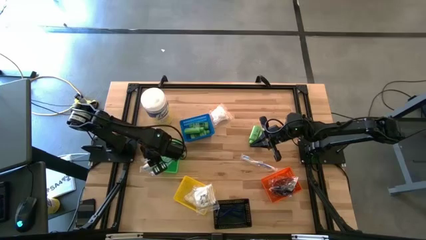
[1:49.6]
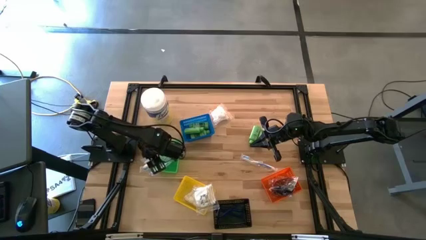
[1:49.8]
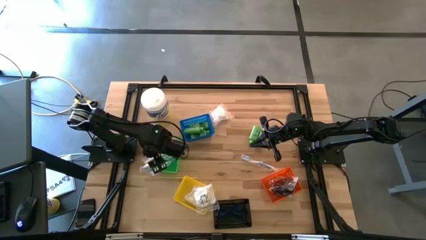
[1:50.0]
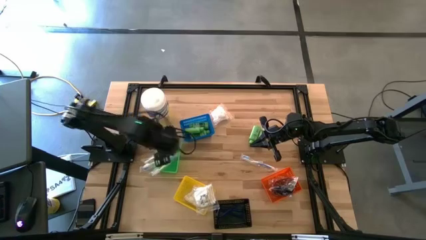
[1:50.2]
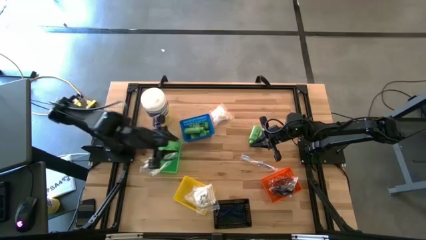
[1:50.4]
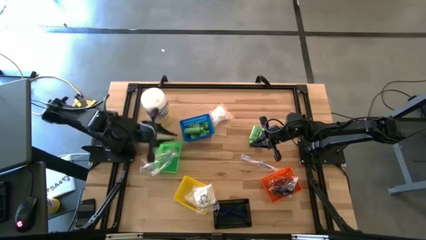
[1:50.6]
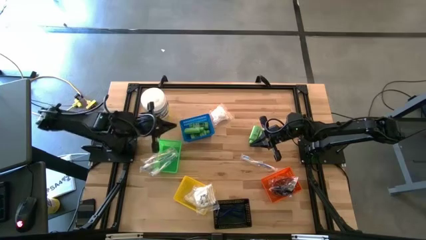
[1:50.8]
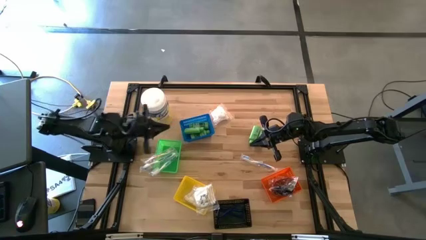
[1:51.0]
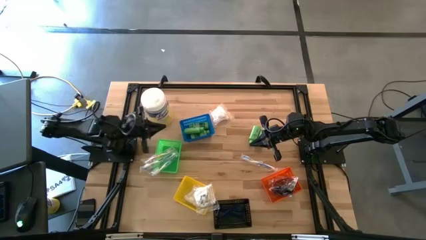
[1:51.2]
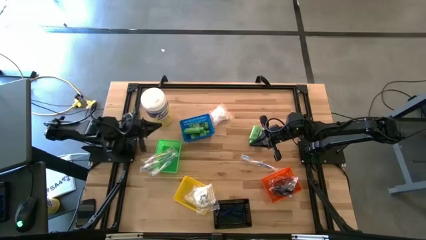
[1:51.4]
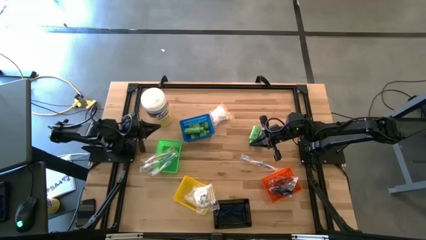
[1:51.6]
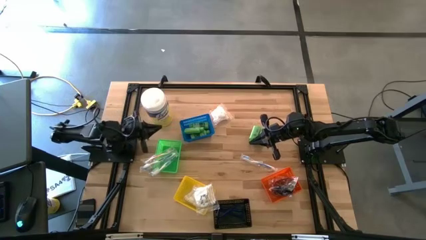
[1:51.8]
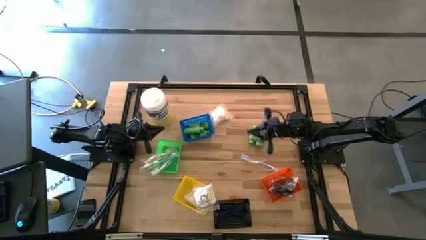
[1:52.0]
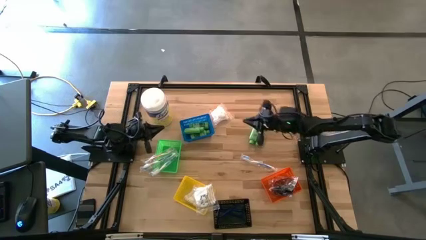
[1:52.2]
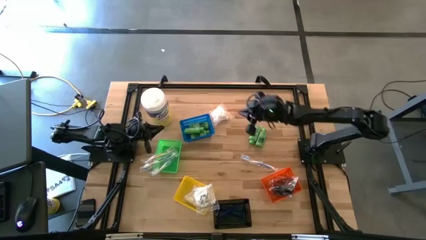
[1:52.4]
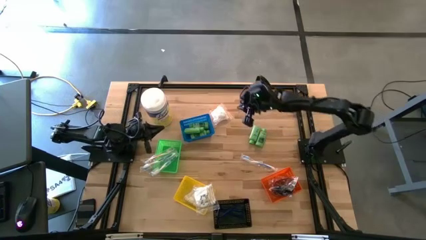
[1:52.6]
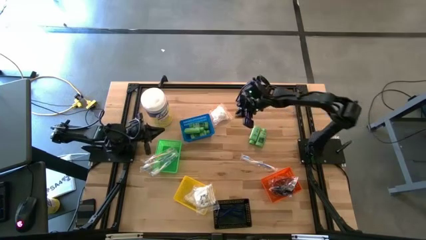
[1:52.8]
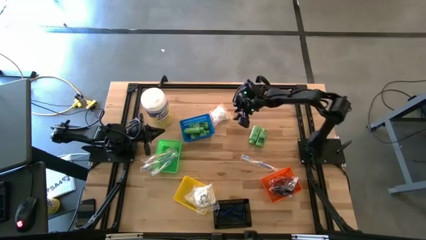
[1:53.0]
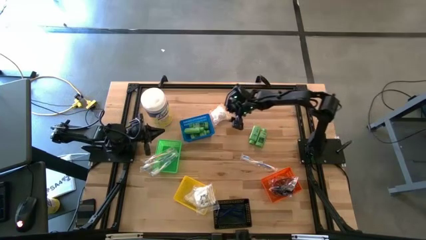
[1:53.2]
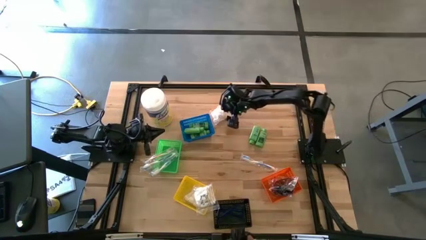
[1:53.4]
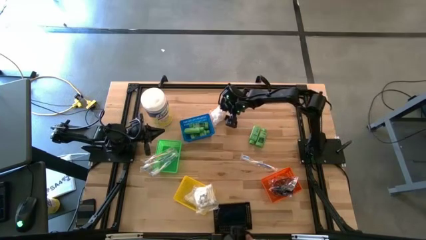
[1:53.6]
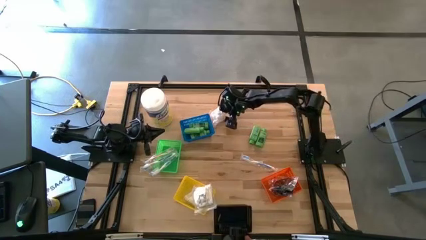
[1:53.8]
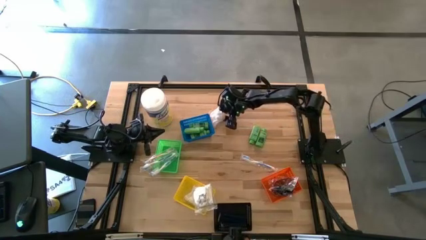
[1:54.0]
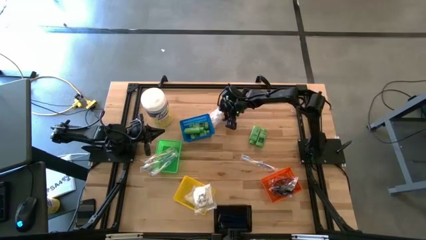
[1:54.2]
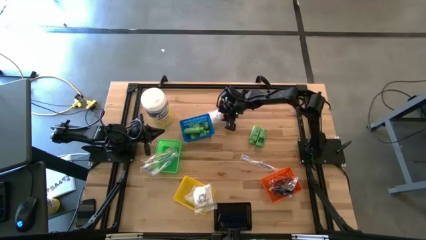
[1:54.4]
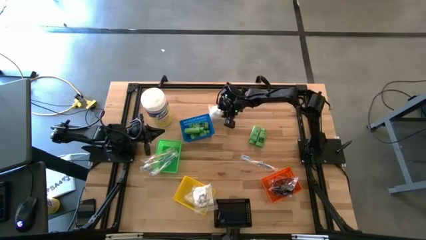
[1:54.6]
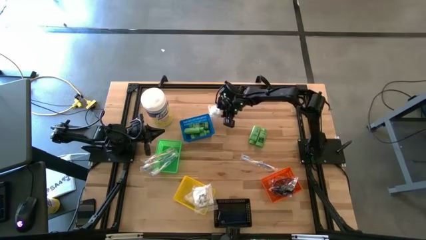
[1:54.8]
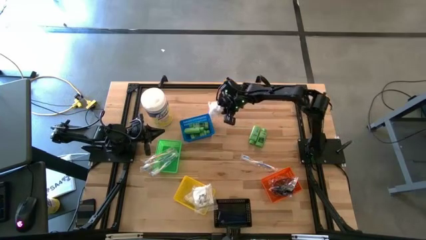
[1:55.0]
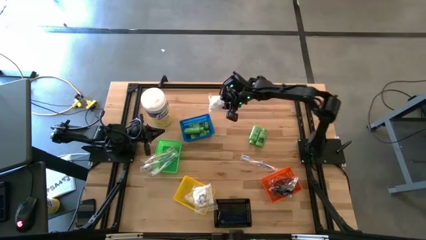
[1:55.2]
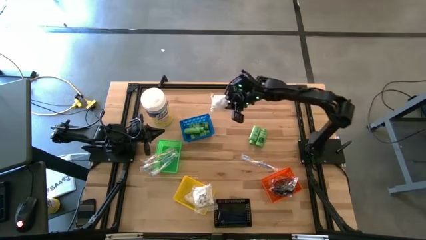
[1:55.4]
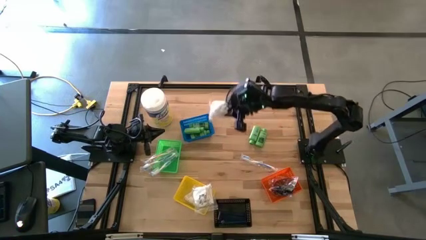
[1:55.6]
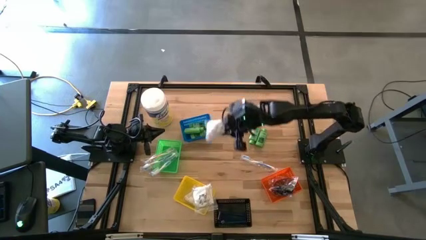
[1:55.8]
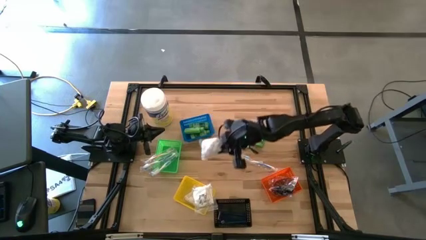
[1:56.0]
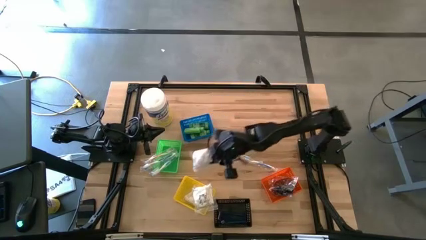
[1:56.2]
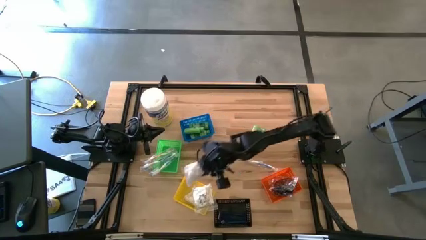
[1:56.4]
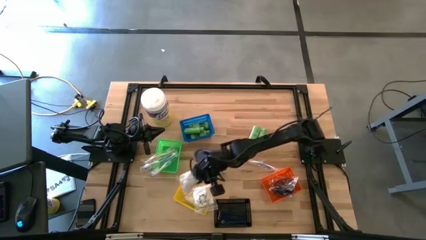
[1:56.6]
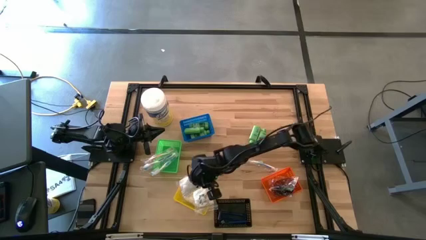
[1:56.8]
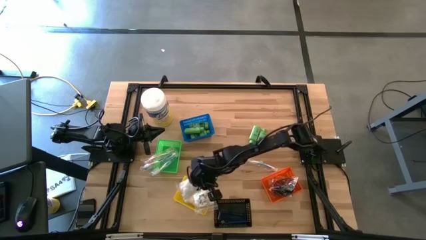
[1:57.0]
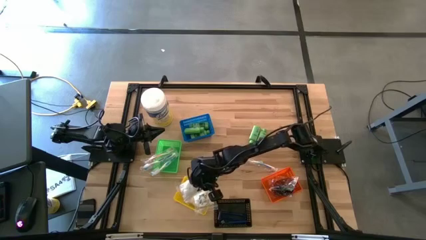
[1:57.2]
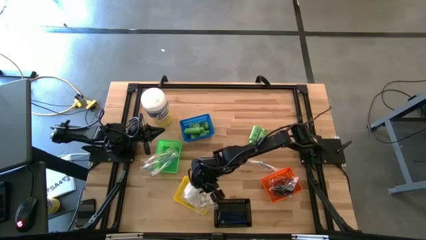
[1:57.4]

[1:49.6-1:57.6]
Task: Pick & Place Travel size toiletries
Put the white cotton pack into the yellow bin

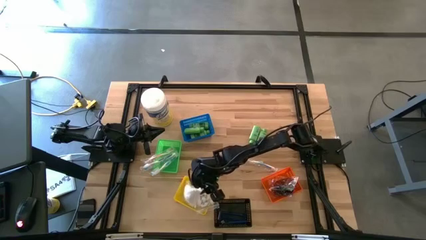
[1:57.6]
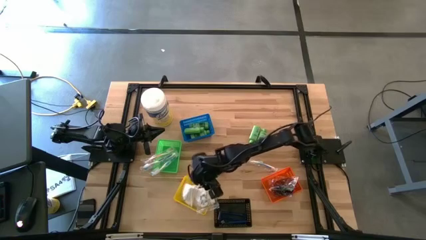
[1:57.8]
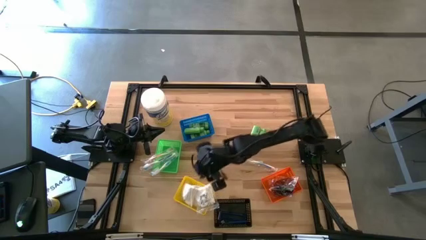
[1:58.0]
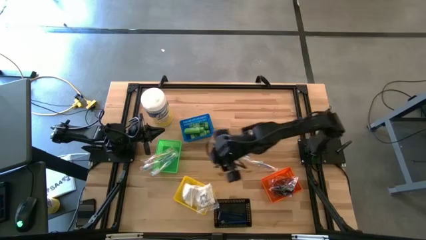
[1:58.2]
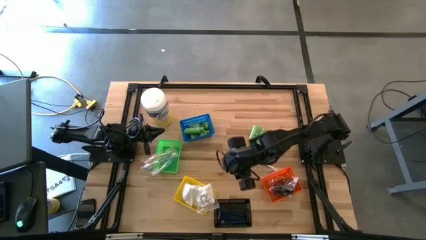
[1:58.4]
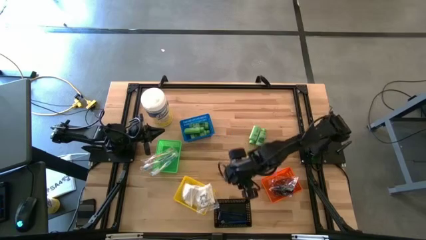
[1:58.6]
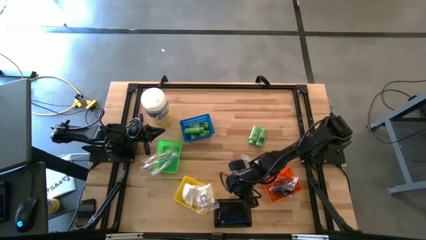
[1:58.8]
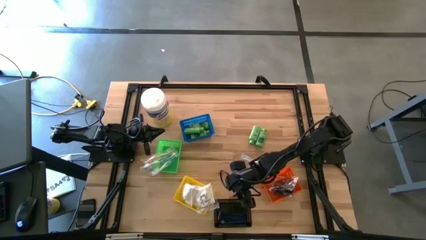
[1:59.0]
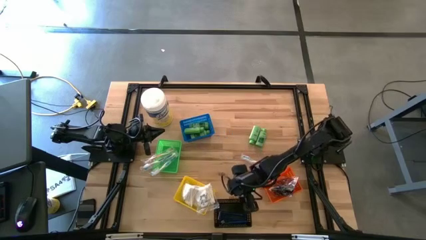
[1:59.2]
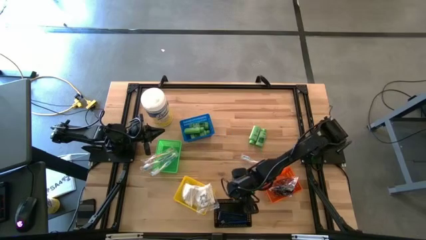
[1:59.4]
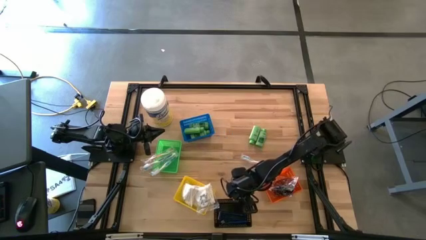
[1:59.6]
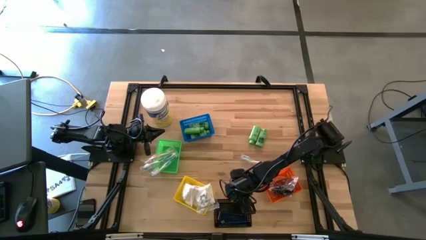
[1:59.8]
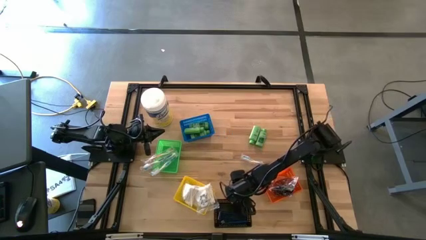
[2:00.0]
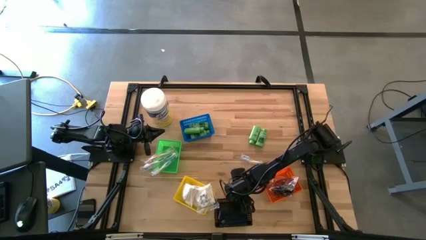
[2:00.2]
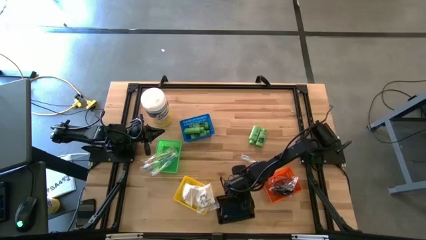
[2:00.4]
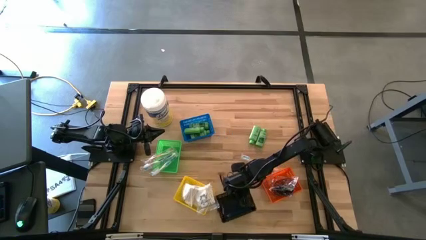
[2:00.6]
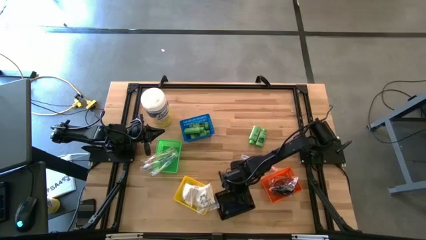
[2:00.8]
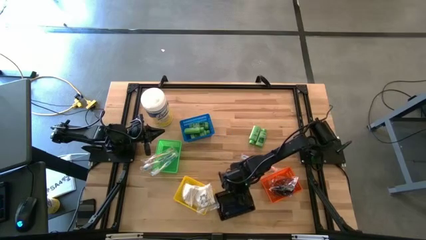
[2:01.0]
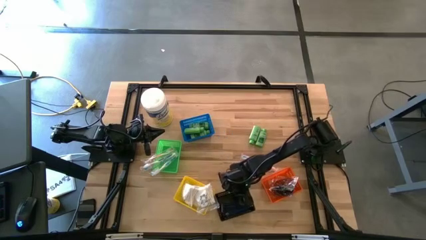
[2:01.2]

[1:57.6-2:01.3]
Adjust the black bin
